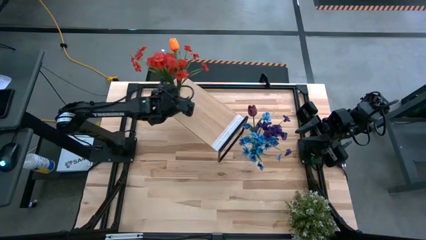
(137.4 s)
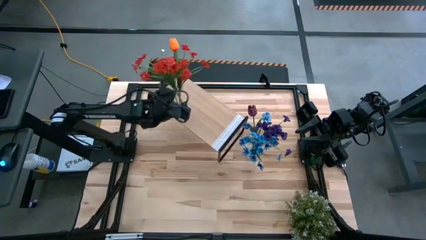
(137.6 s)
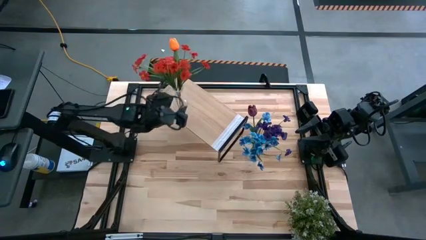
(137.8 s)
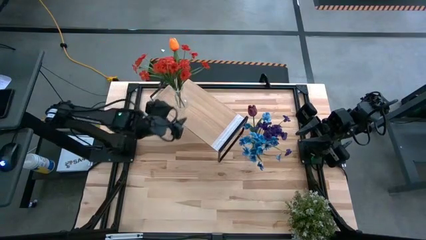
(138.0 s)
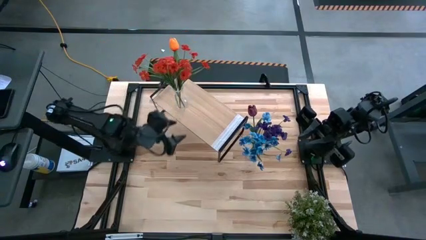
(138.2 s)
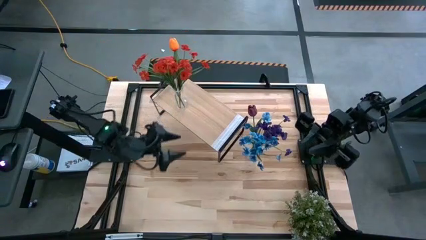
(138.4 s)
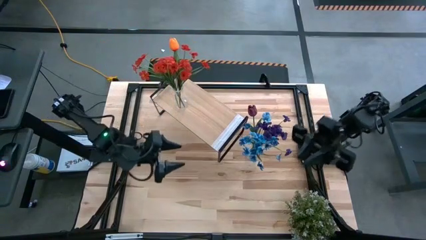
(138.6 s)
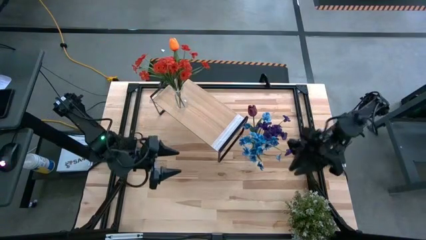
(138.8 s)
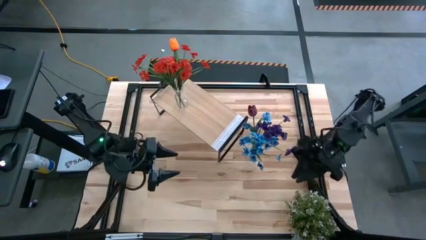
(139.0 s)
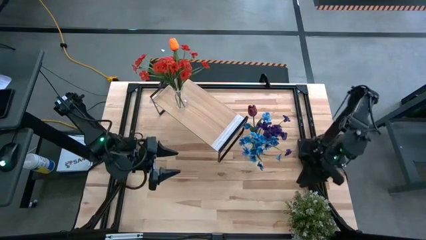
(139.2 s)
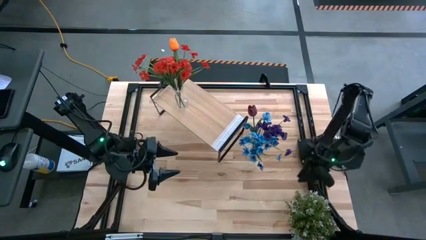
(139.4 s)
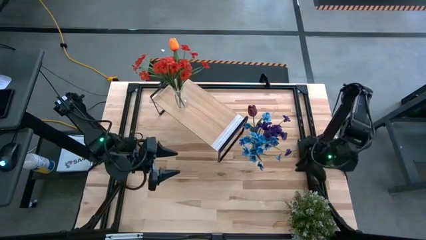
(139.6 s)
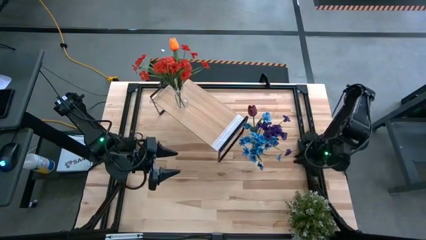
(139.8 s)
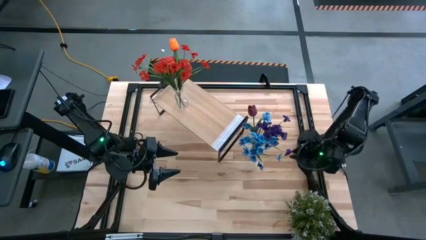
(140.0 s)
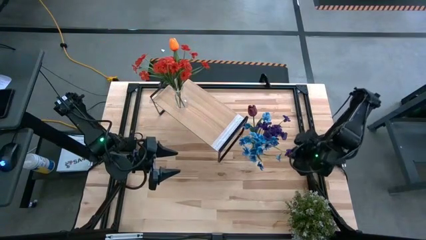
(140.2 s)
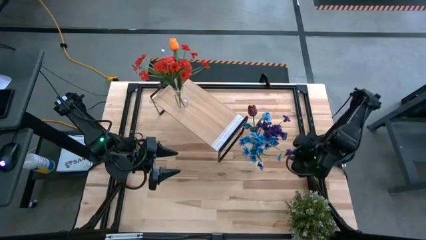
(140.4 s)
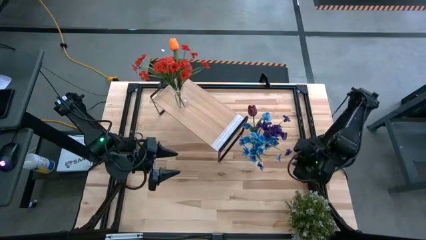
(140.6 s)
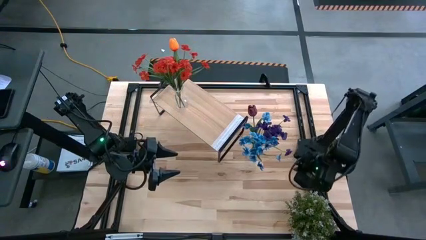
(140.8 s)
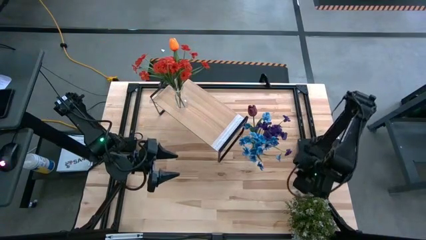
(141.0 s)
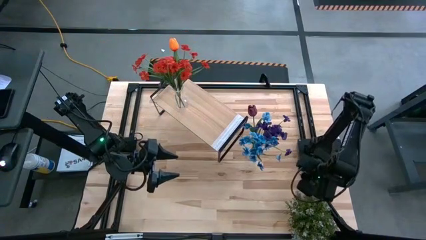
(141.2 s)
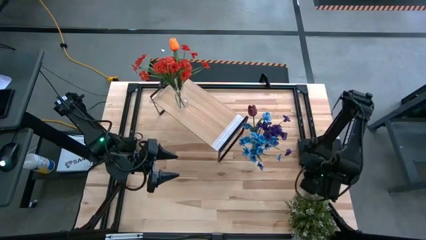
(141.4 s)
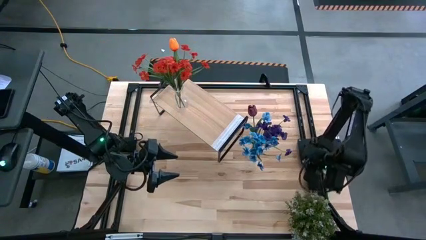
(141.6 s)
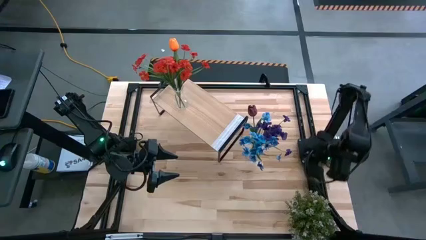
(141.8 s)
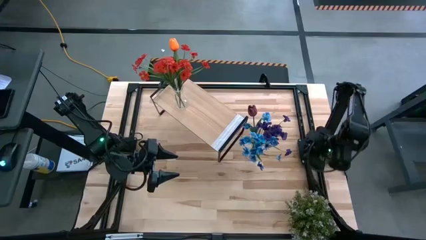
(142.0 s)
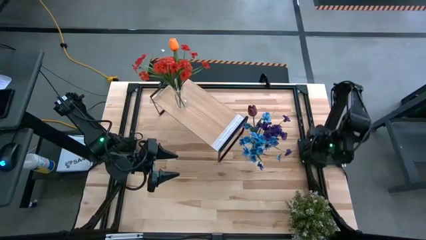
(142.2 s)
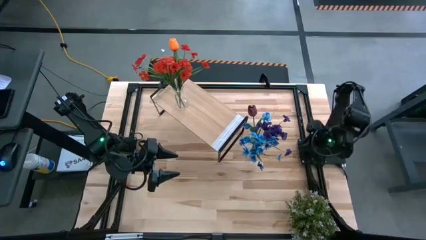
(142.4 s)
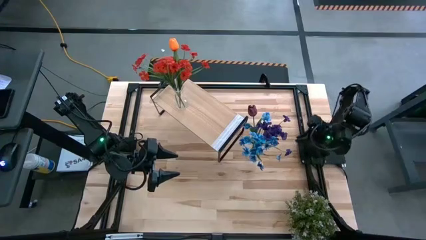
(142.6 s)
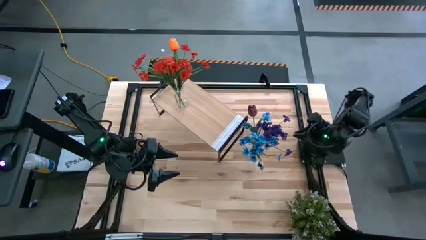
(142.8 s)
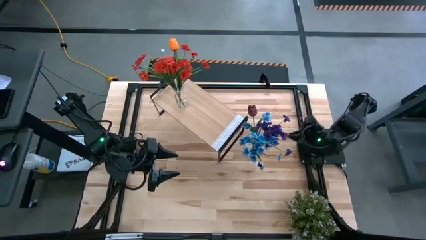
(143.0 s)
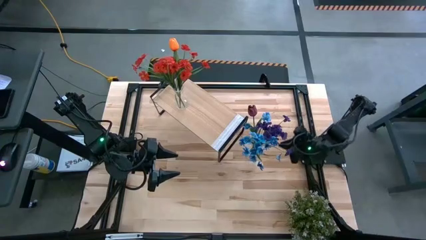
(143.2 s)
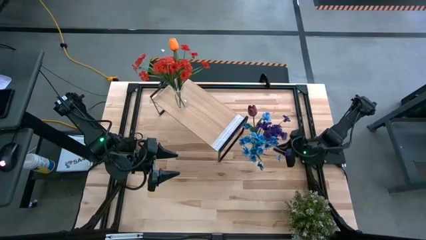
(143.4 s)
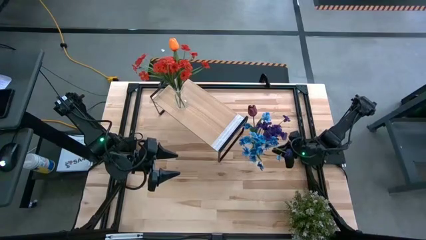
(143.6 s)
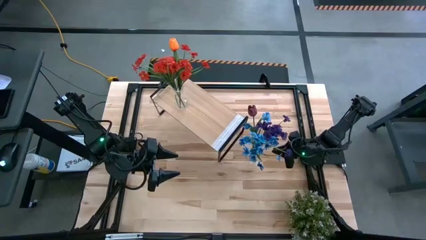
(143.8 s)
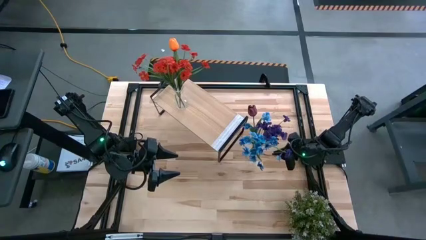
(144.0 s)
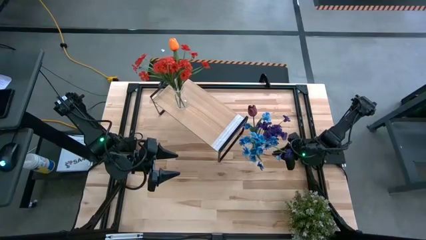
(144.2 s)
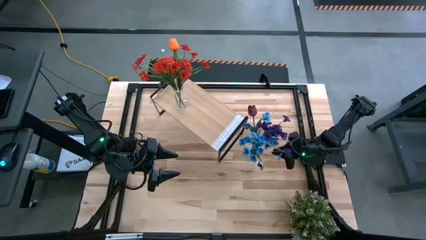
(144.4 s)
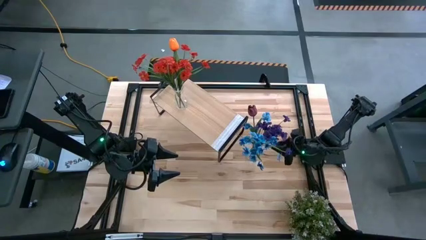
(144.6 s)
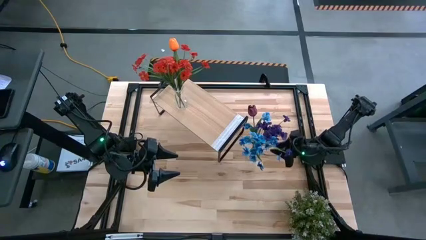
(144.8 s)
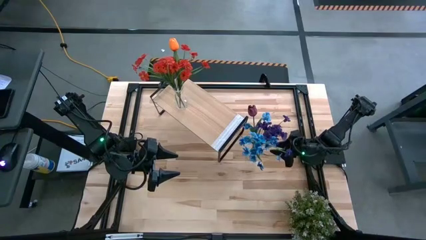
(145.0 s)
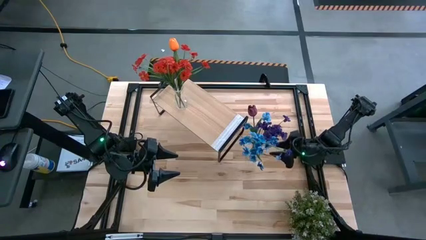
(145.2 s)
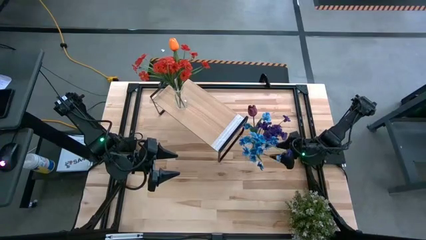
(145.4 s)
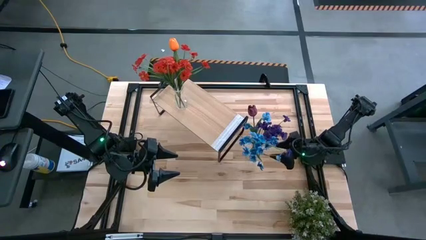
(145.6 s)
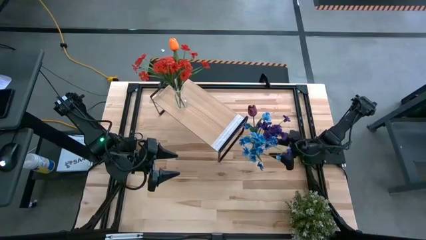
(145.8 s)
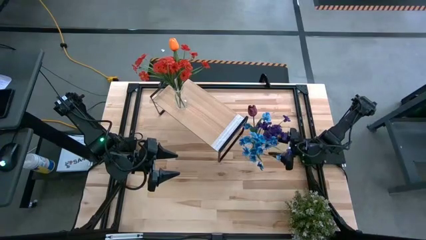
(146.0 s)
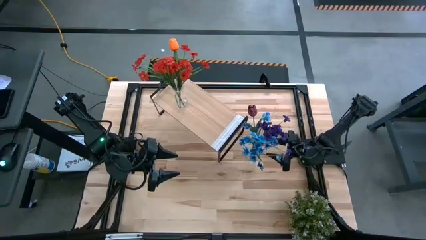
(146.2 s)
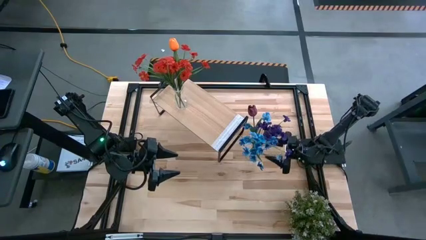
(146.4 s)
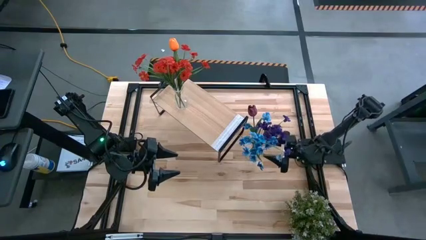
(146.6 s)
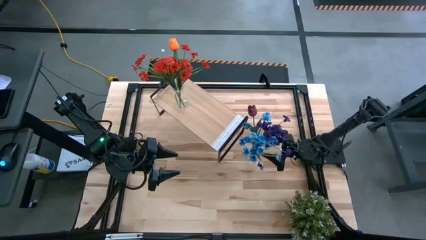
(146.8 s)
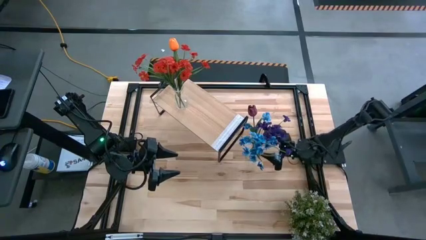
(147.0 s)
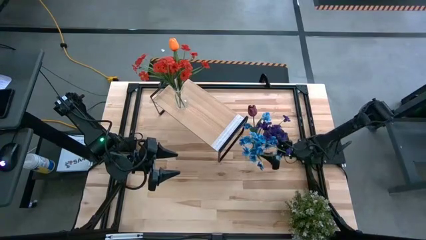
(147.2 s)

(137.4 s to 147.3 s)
Task: Pick and place flowers into a vace then onto a shelf
Put the transparent flower vase with flowers on the shelf

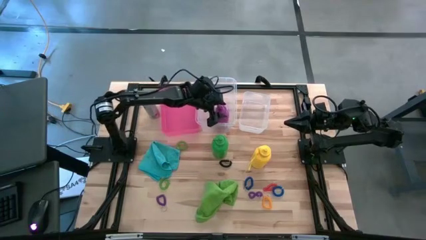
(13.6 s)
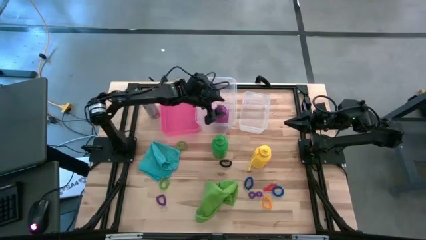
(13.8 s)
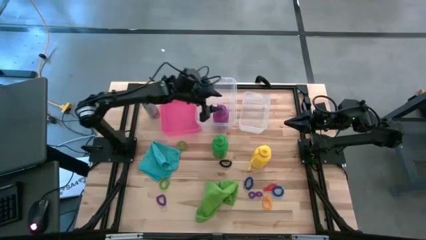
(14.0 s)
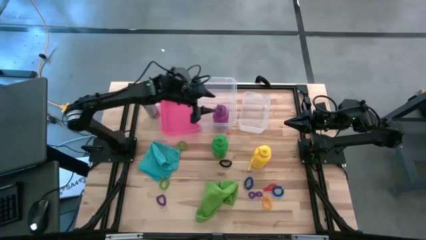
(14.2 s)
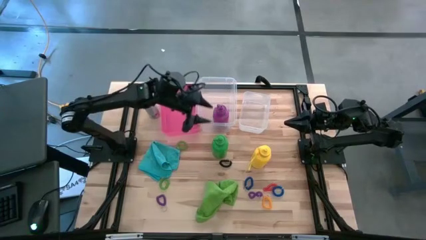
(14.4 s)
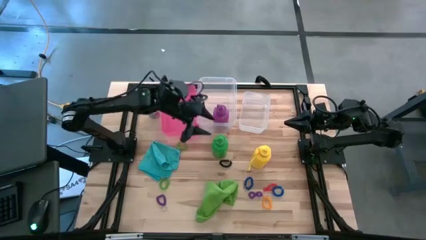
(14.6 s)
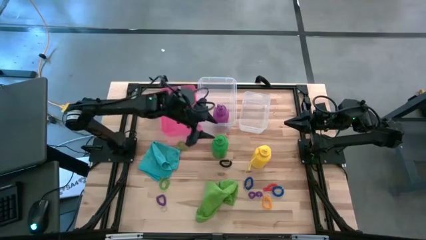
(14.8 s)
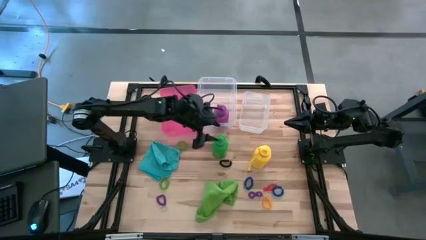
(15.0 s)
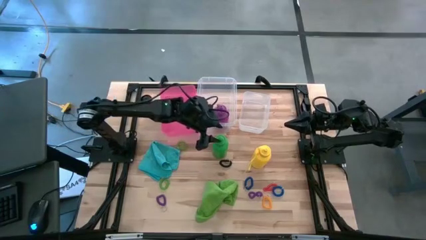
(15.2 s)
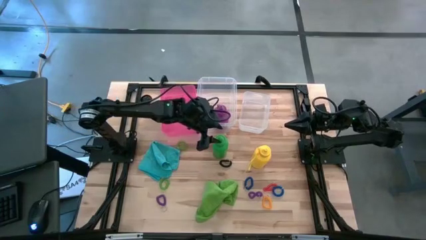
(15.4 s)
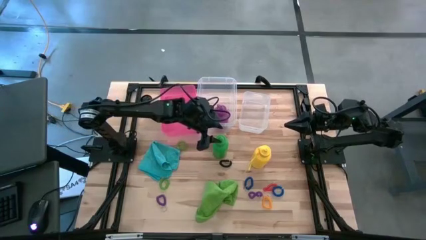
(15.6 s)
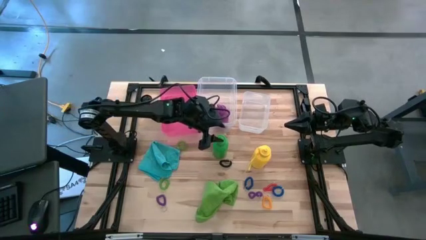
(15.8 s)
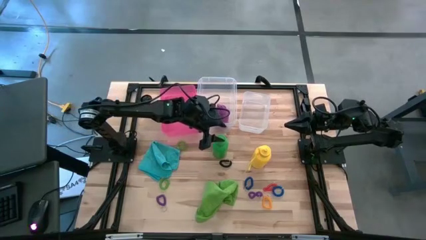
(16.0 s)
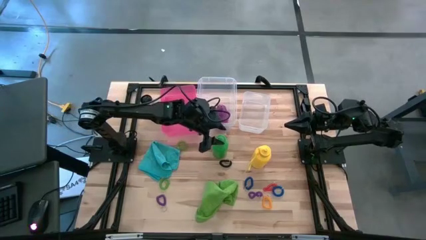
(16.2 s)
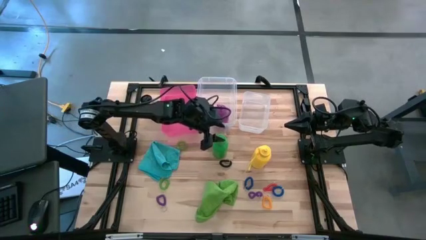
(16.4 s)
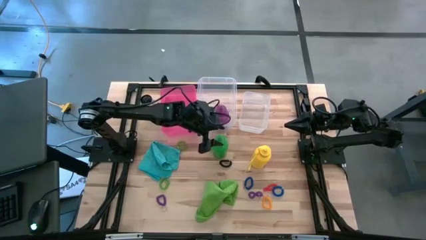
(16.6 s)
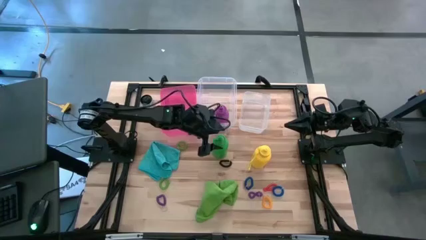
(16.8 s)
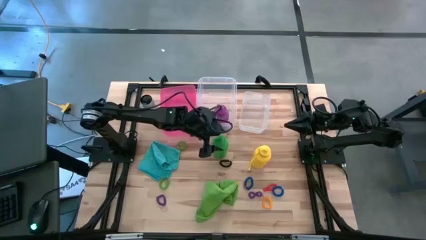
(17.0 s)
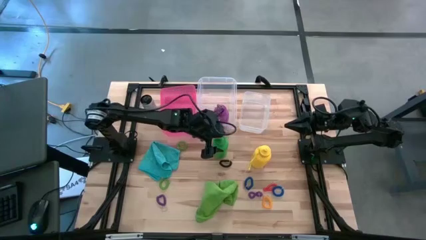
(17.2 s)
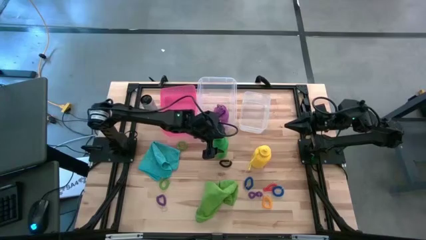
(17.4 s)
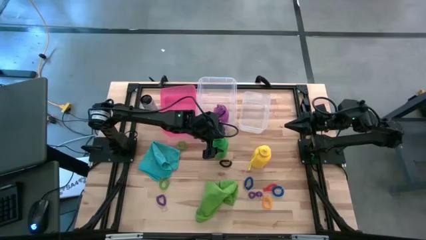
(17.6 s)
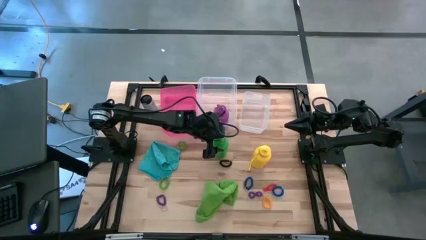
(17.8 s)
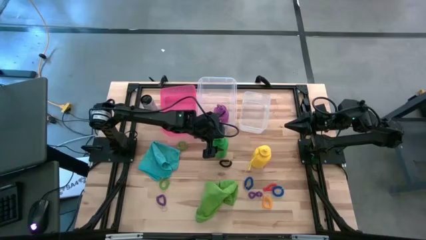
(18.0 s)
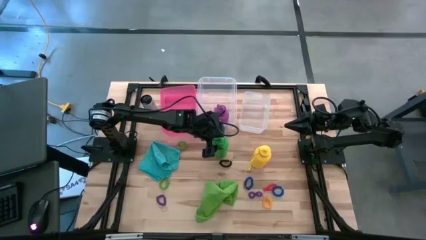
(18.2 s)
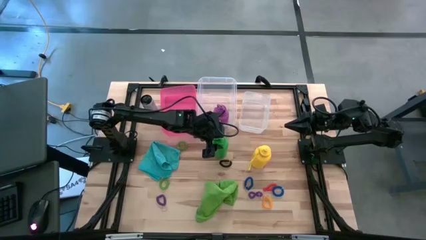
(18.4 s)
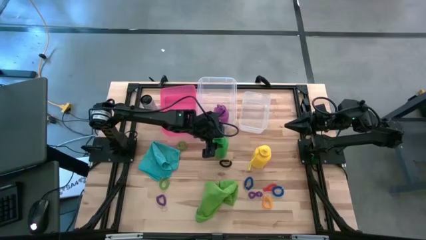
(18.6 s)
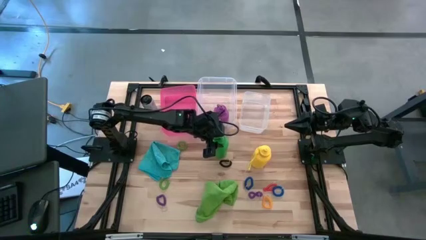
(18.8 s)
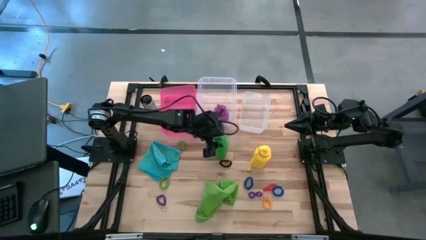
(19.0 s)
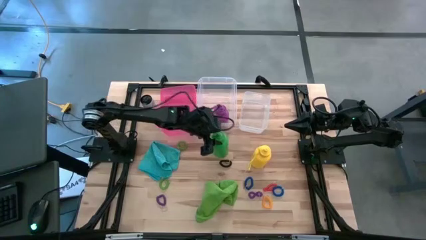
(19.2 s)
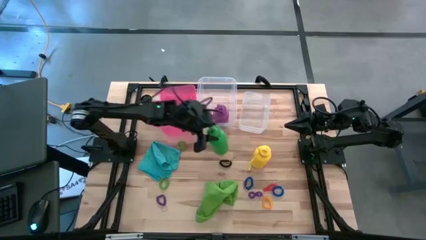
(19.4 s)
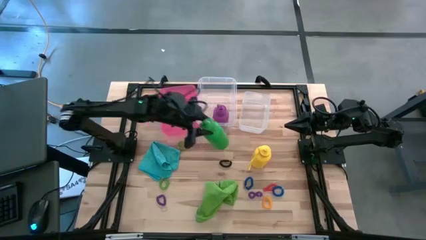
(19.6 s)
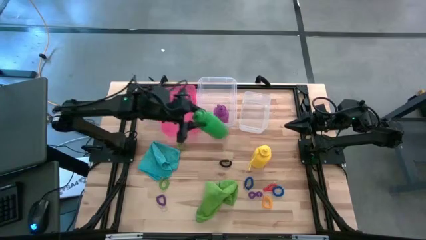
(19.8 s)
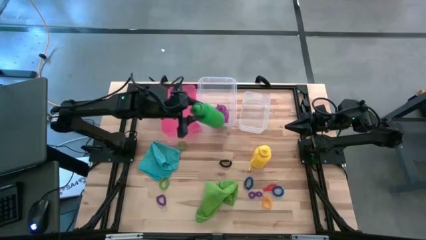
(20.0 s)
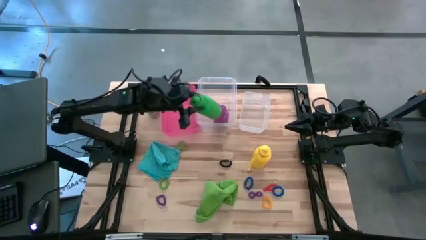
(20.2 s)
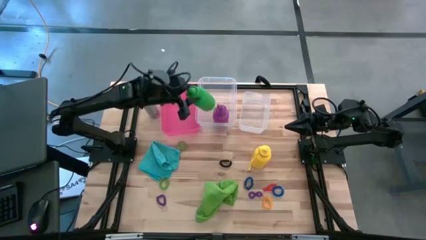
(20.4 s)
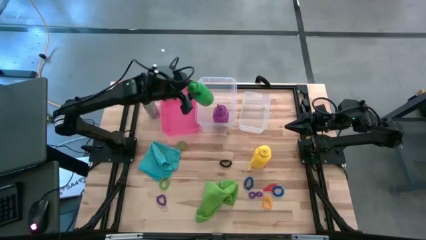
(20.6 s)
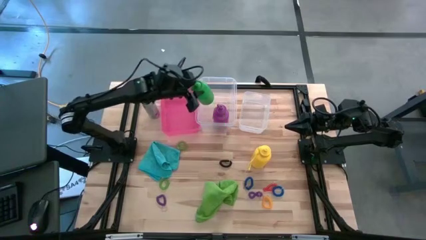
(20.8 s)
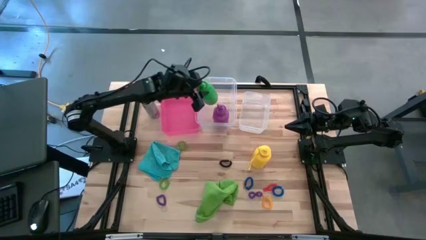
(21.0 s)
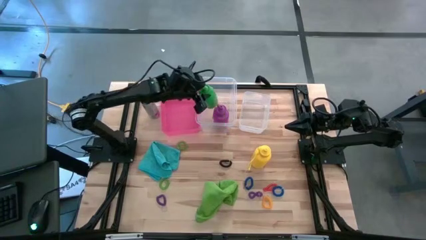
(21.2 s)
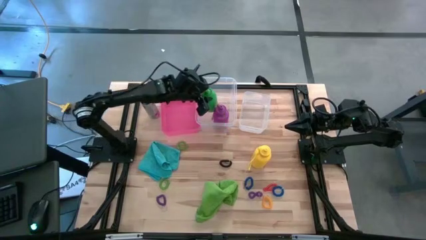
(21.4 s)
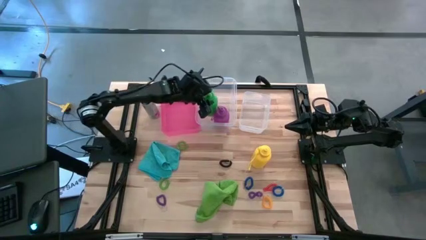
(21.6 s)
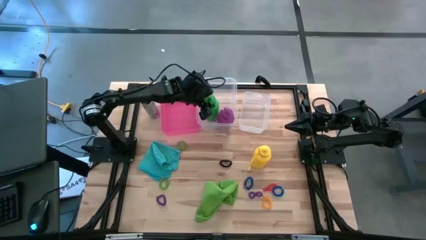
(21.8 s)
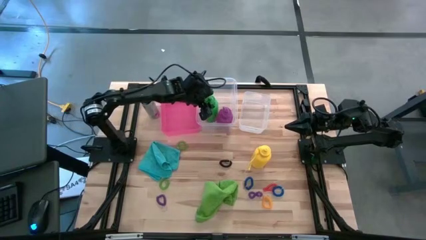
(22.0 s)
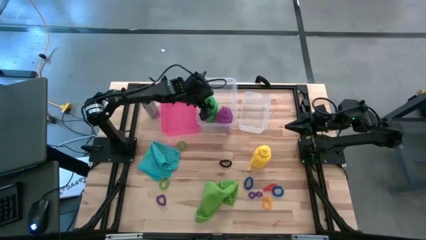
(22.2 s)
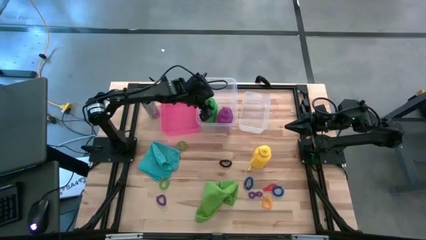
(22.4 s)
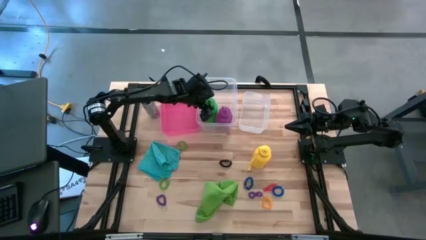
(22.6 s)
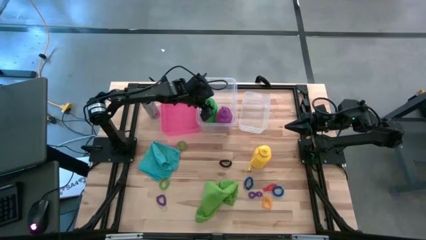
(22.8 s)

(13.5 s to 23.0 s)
Task: Pick & Place Sports Items
Put the green water bottle into the left transparent bin
